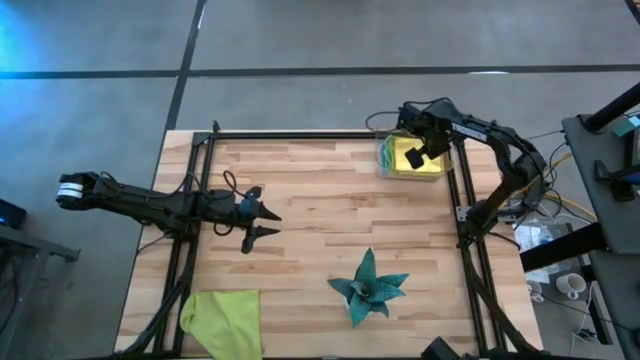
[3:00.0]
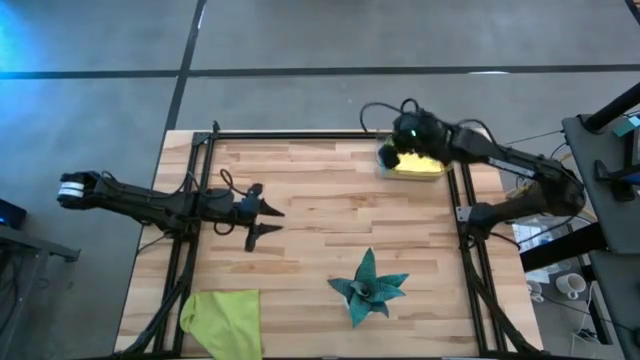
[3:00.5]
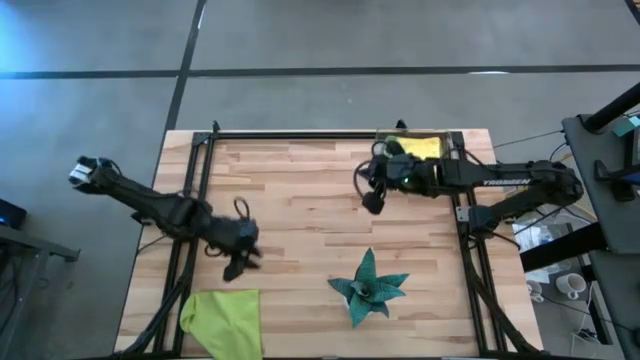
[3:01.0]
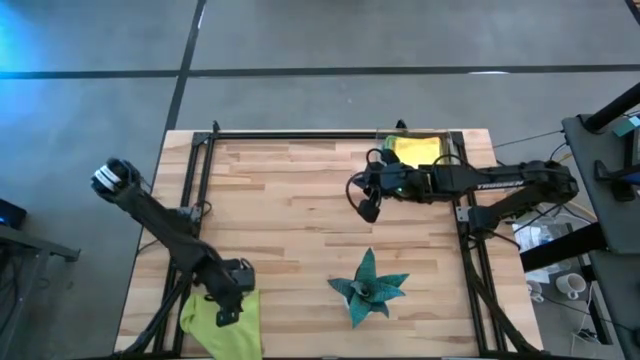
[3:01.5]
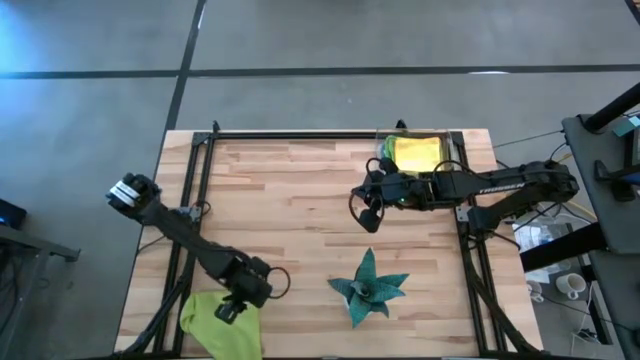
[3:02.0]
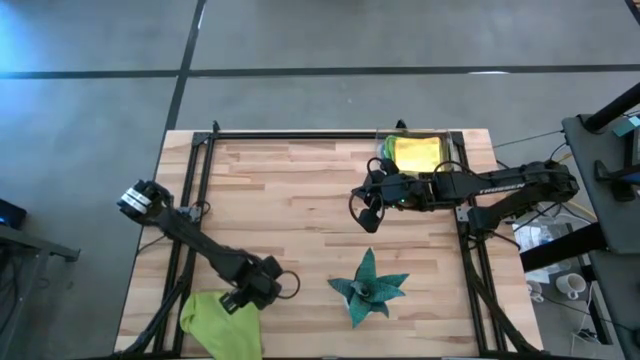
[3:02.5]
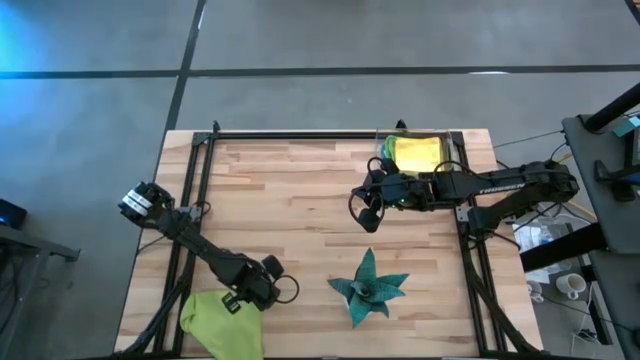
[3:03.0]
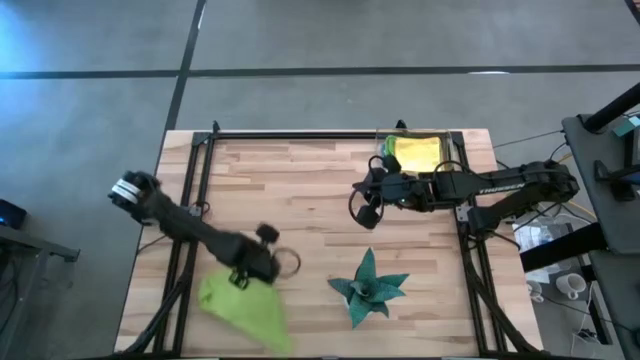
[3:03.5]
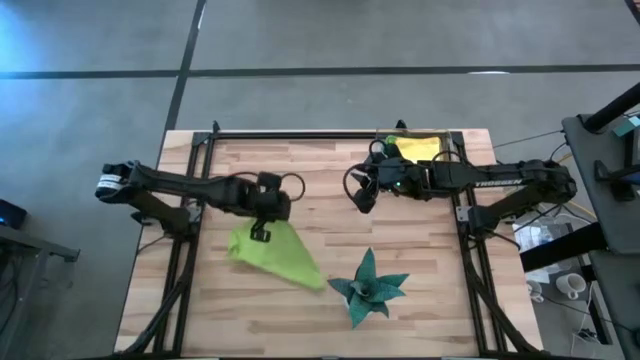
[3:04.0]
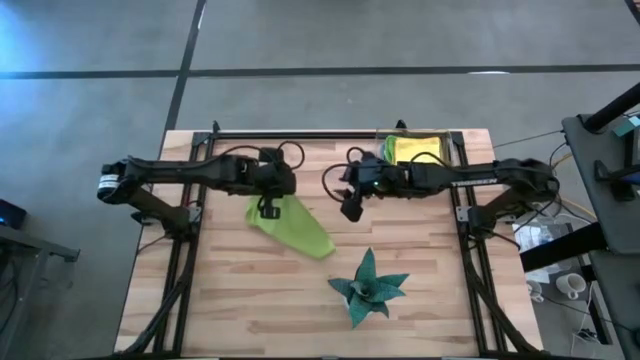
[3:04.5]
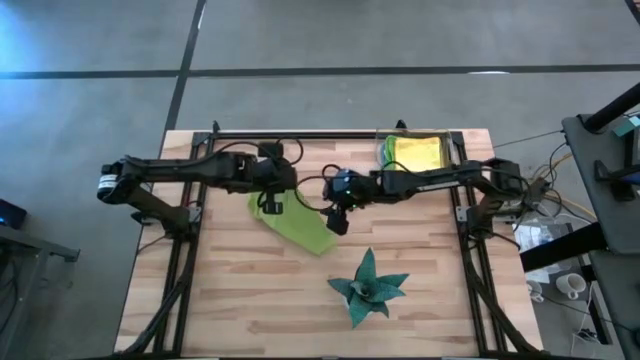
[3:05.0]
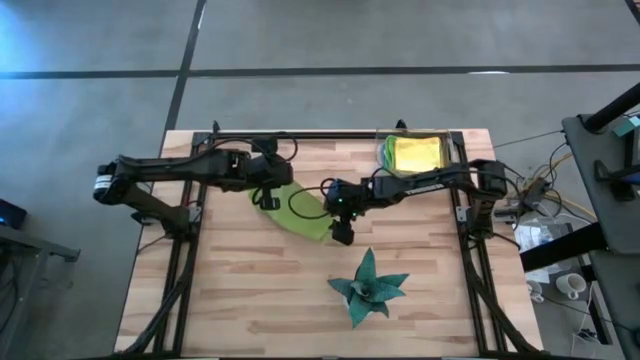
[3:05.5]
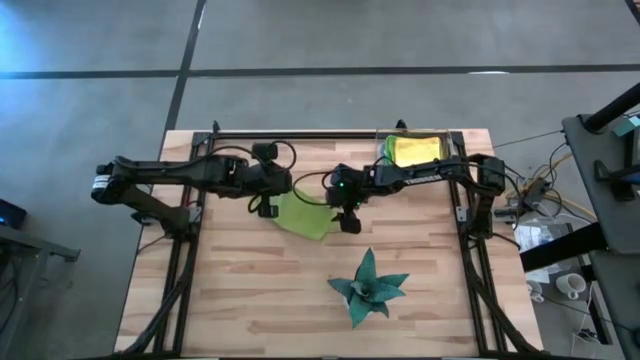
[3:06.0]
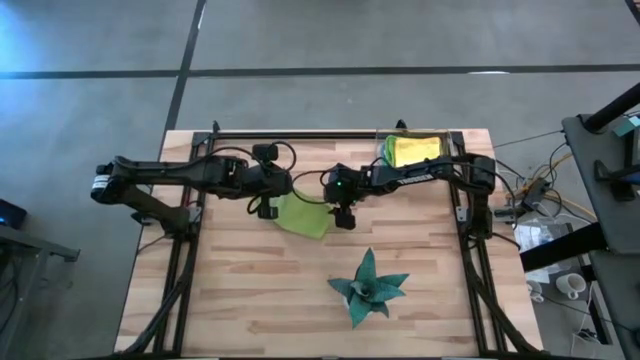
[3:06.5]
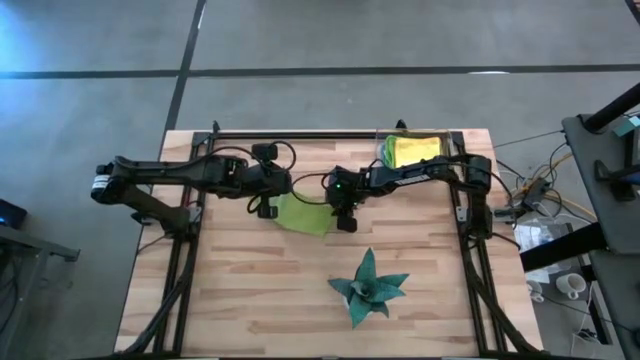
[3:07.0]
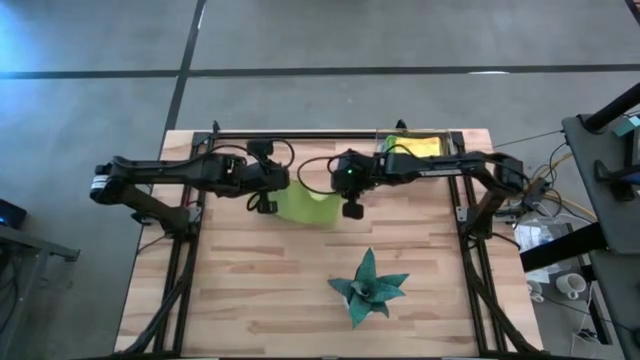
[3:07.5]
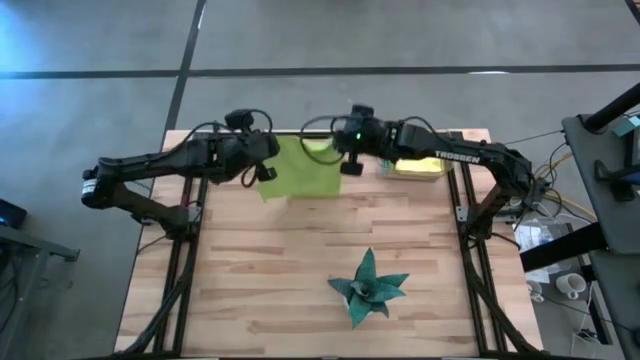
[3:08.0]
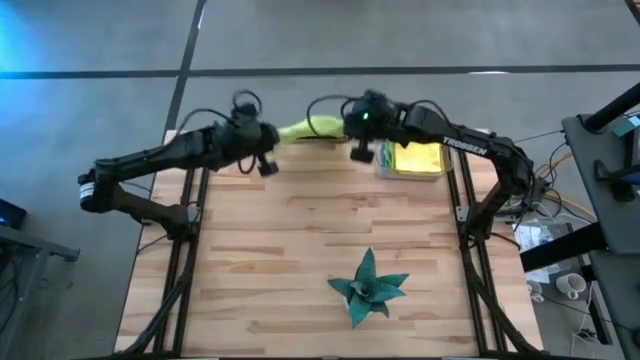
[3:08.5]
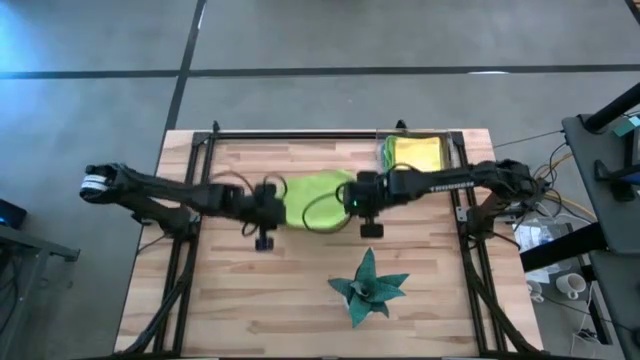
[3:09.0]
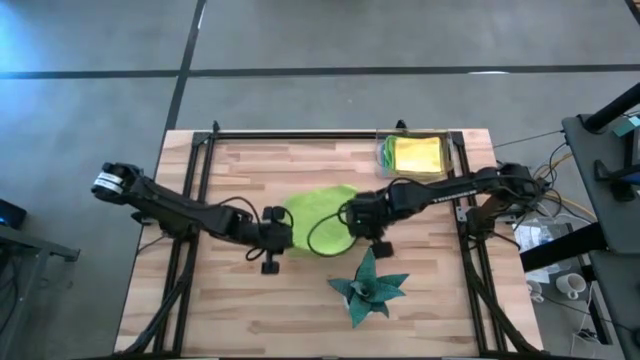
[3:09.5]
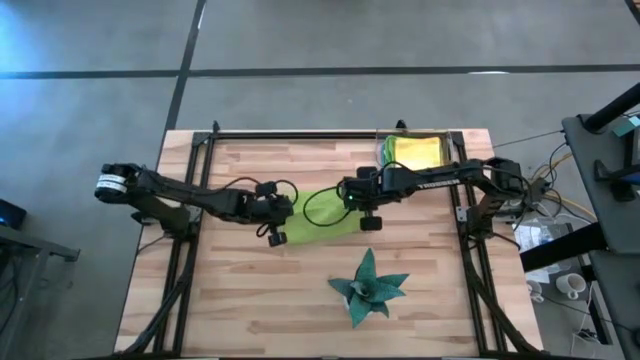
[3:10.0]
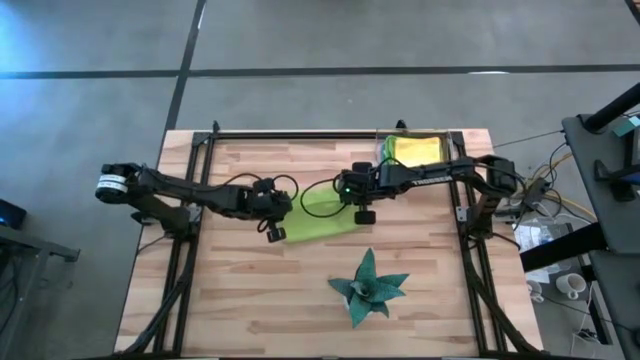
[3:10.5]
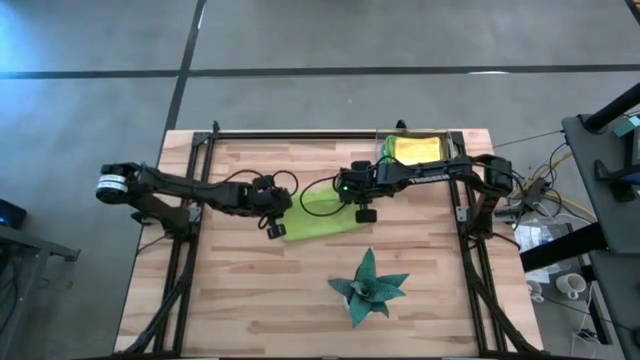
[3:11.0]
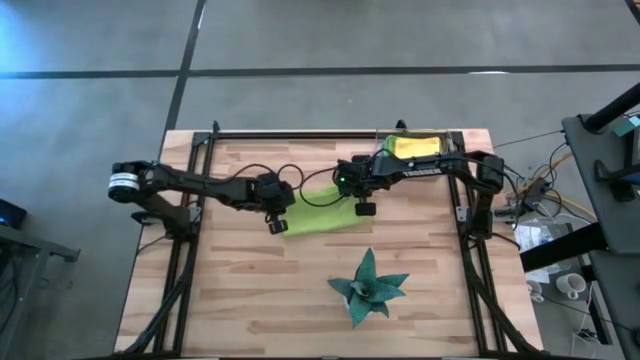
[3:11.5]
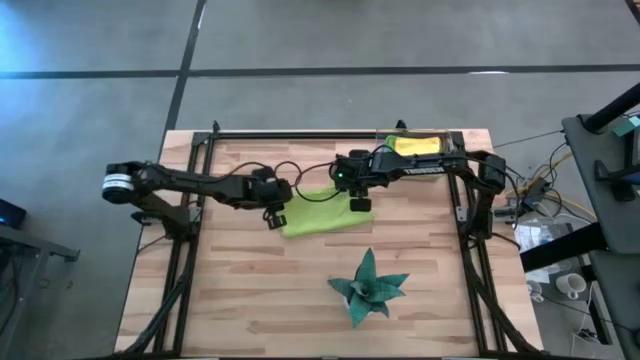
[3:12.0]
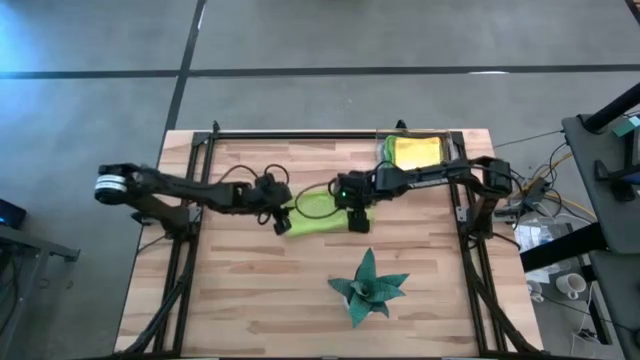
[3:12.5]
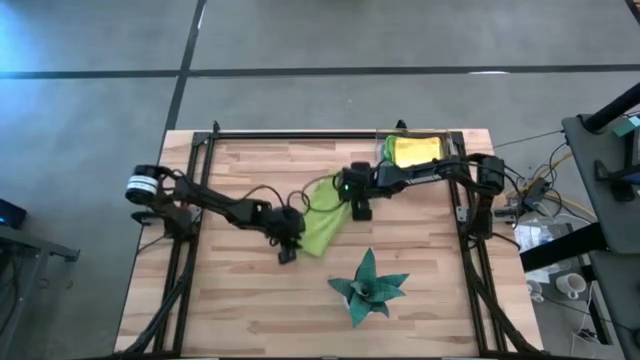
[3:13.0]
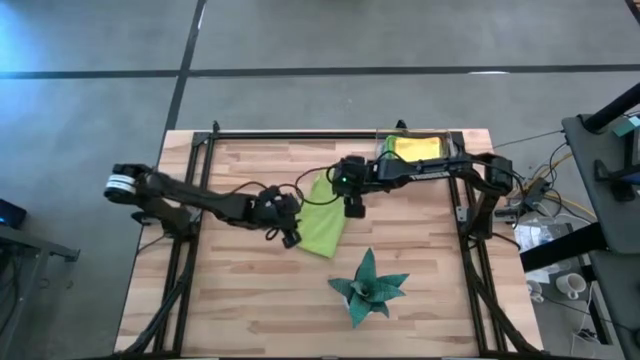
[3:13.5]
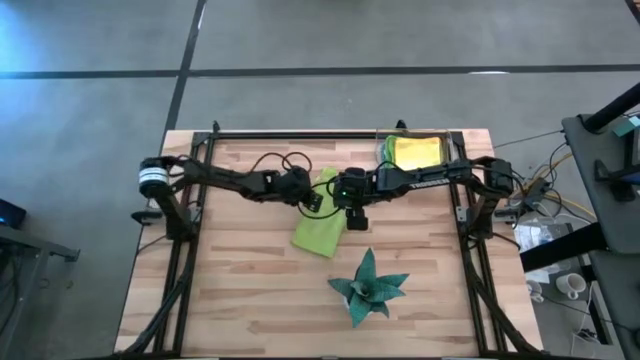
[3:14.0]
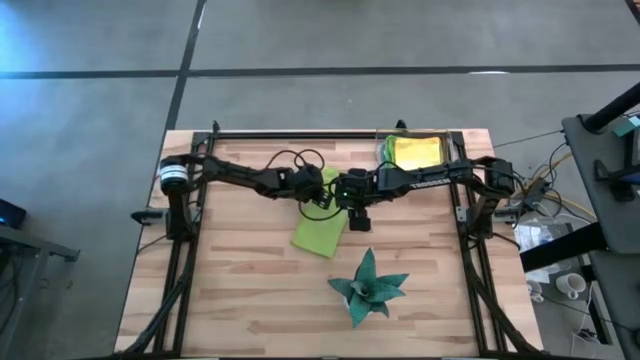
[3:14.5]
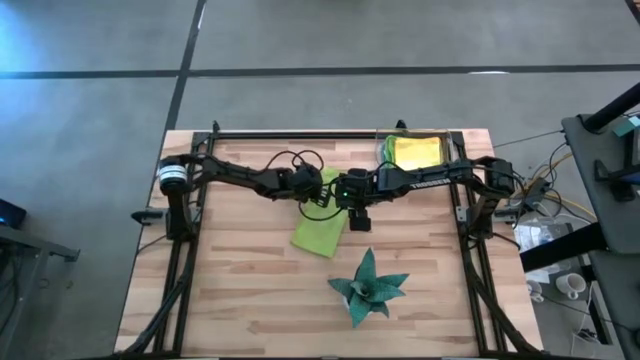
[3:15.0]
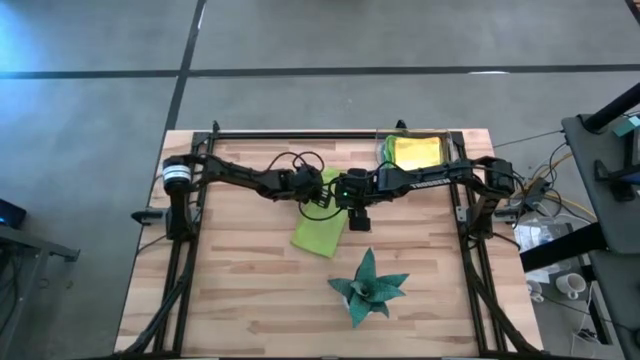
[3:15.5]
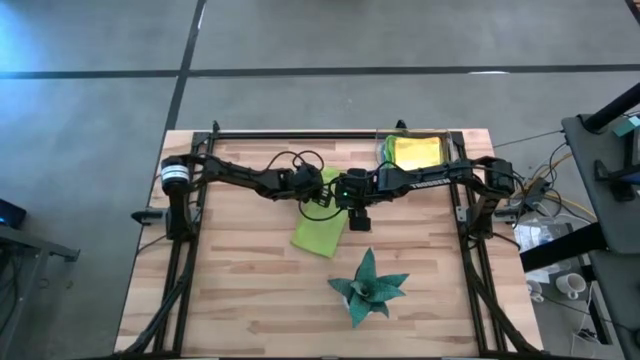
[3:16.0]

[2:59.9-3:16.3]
Task: Fold microfiber towels
Fold the light green microfiber cloth

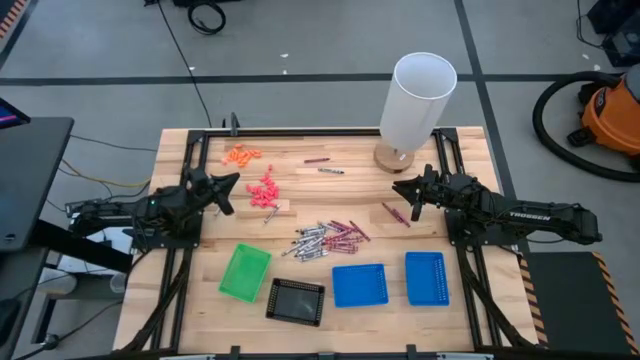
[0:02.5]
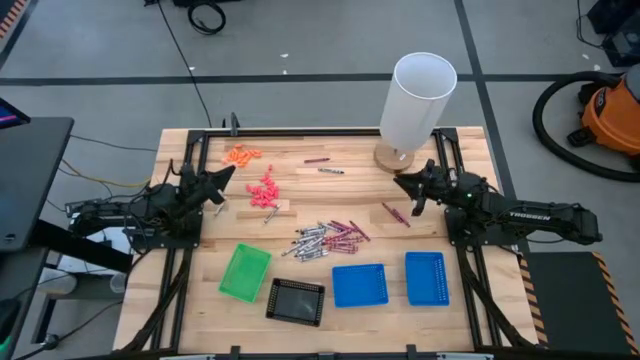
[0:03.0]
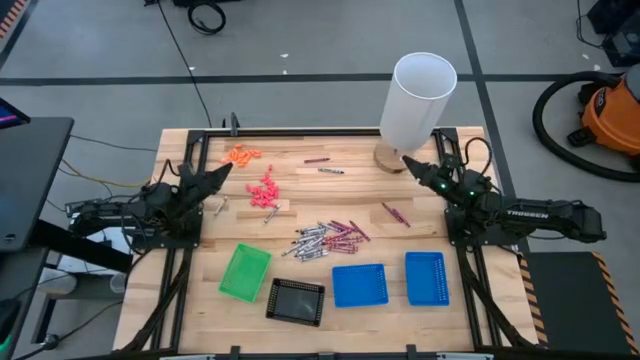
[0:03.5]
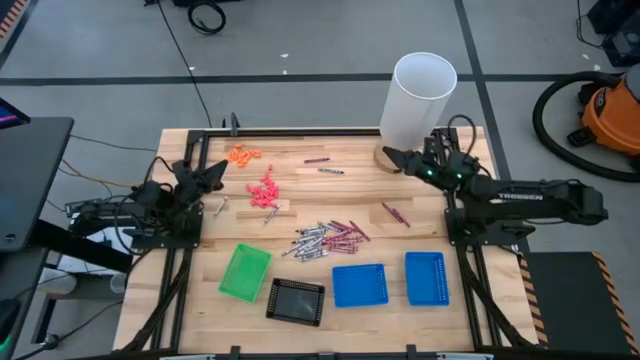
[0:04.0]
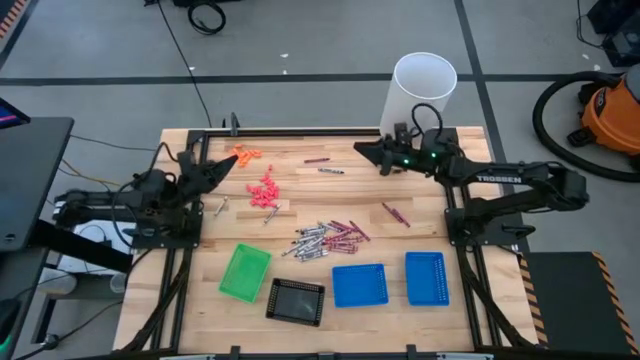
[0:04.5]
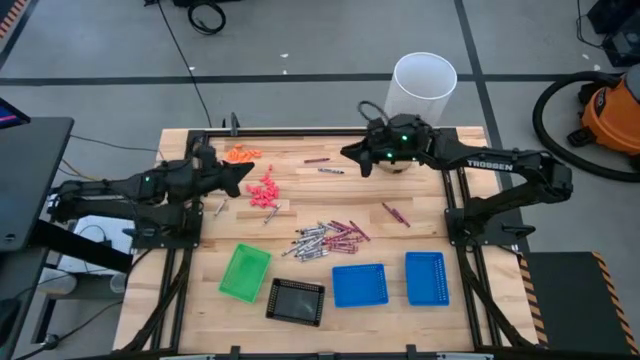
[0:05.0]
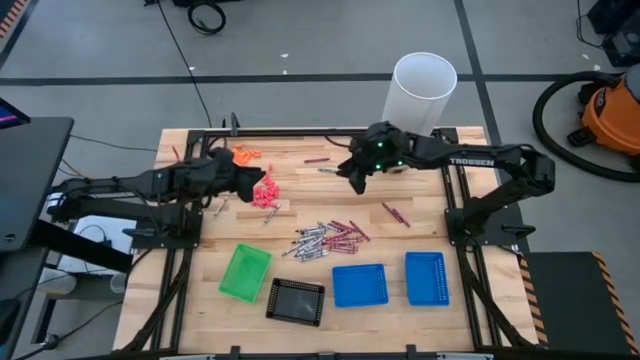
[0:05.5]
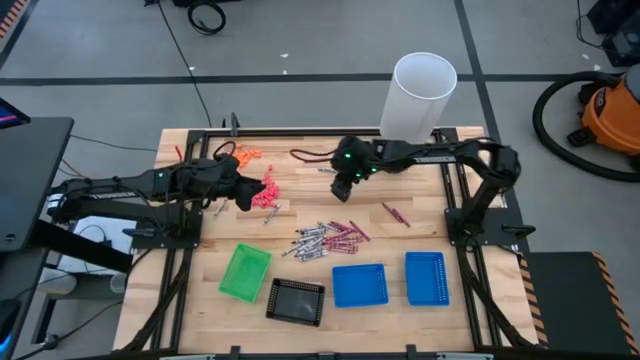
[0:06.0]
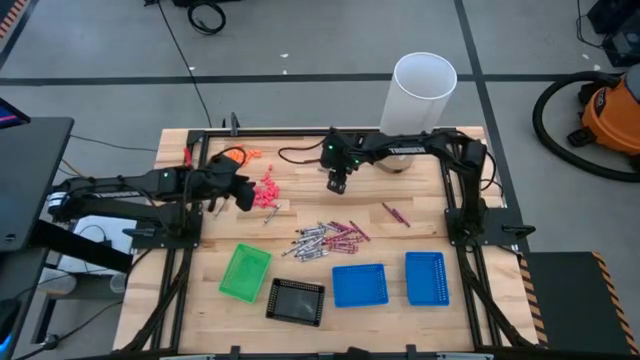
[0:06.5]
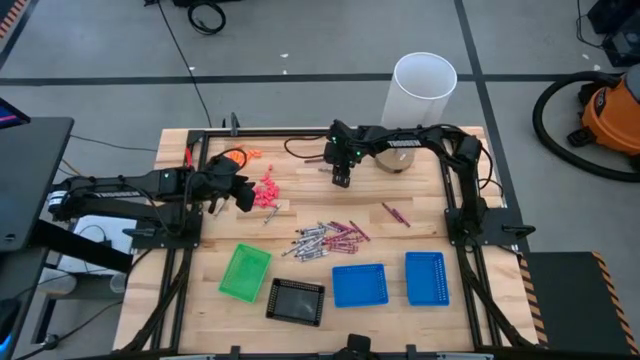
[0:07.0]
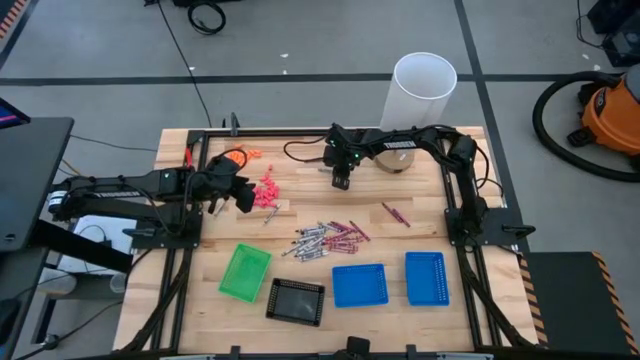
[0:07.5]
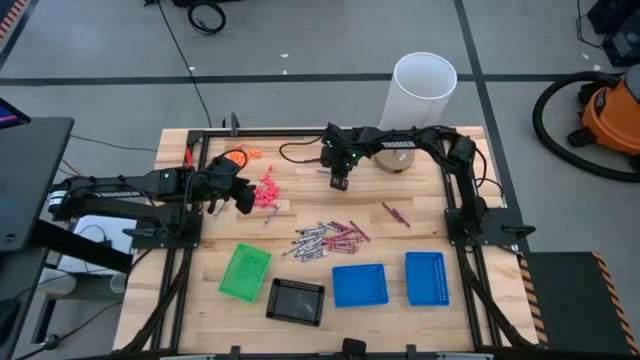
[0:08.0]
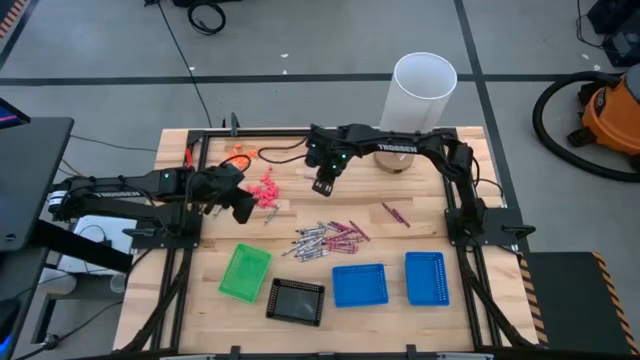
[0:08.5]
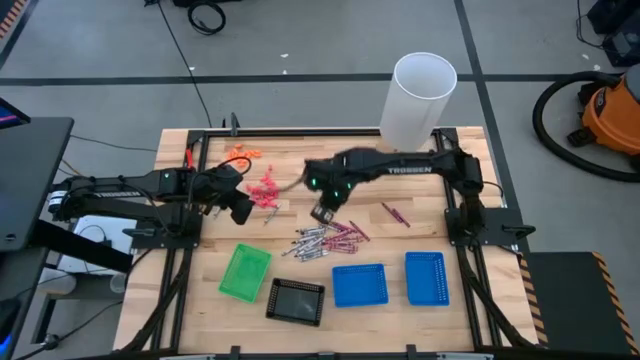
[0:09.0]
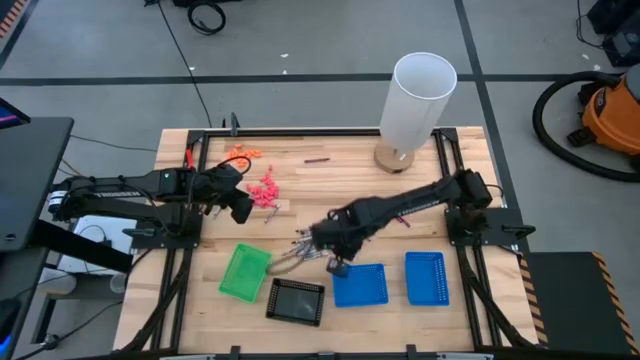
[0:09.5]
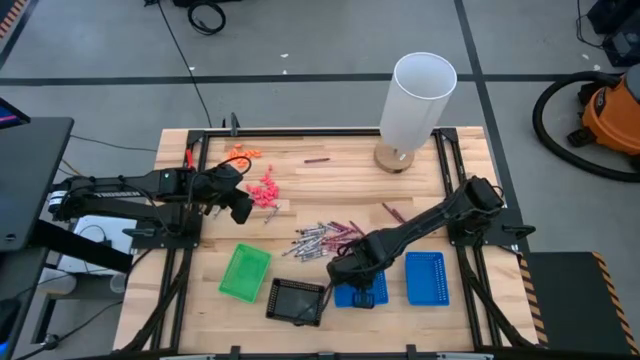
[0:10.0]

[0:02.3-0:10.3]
Task: Sort crayons
Put the black crayons into the left blue basket
